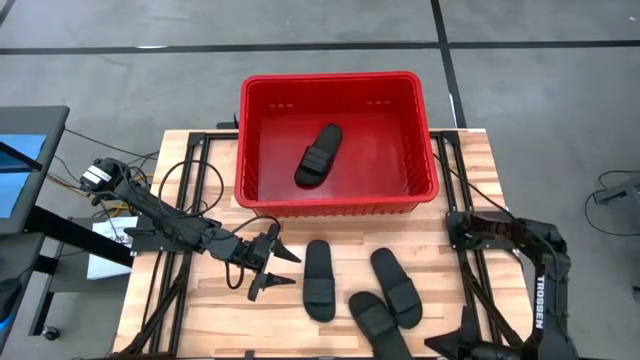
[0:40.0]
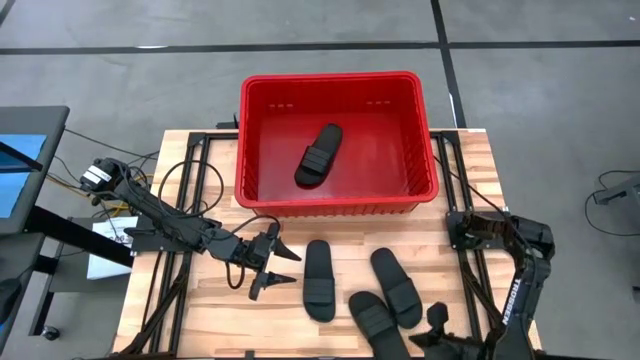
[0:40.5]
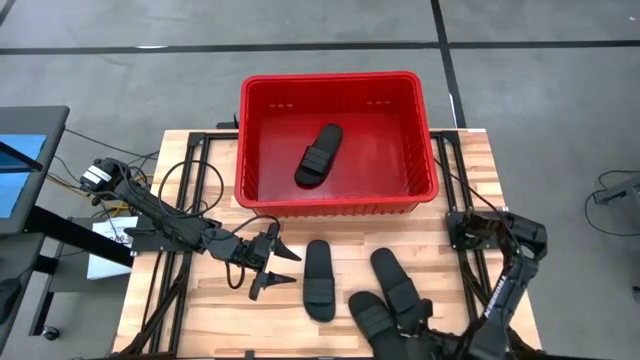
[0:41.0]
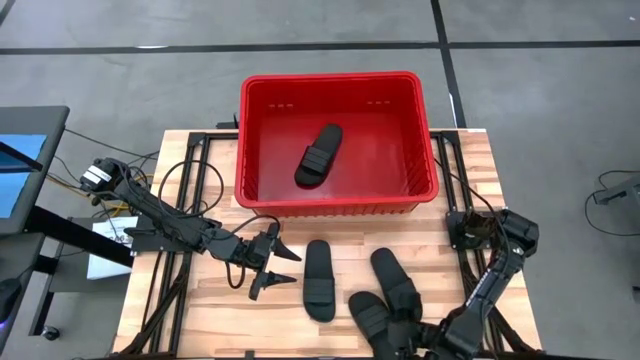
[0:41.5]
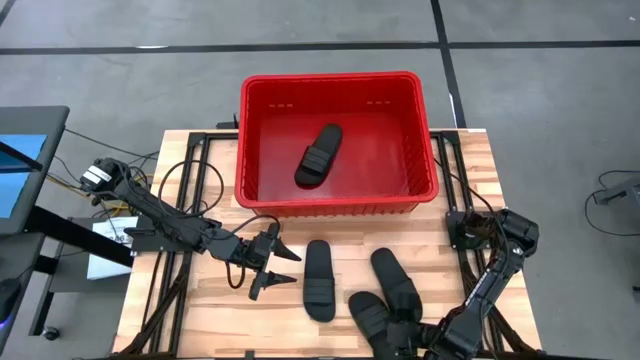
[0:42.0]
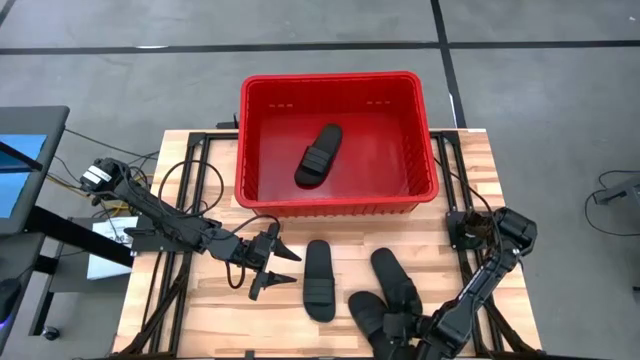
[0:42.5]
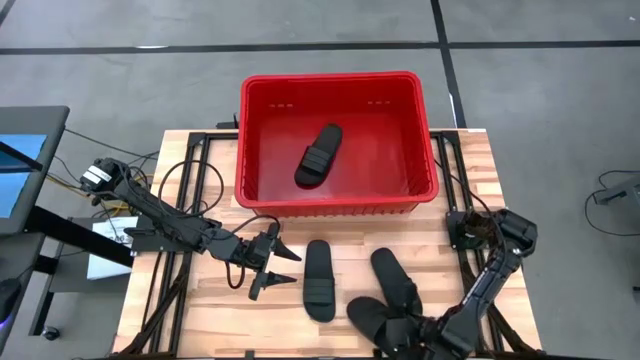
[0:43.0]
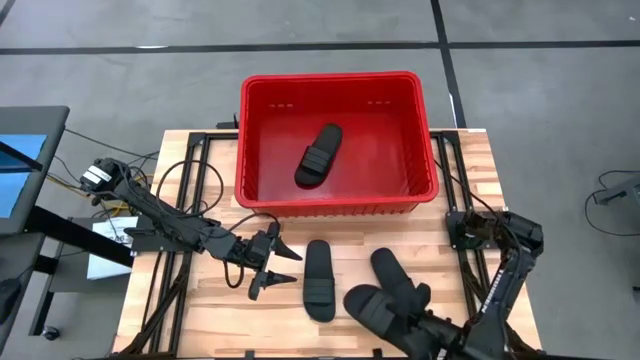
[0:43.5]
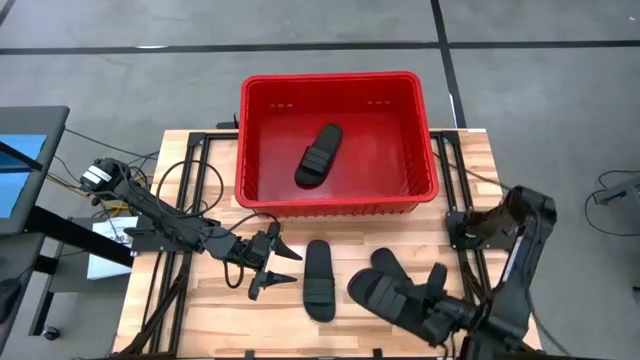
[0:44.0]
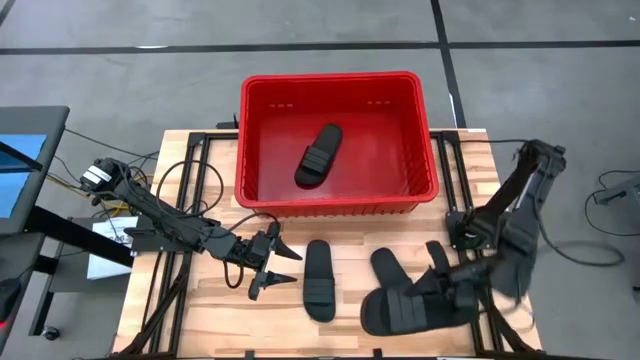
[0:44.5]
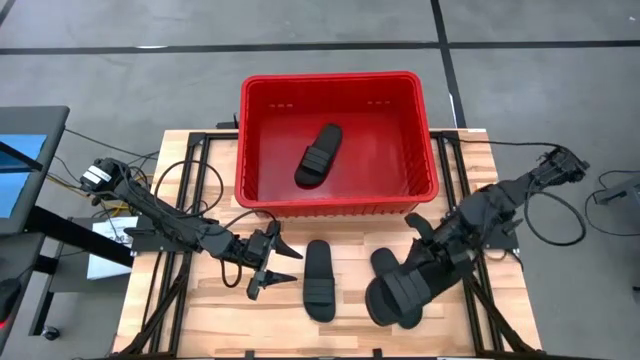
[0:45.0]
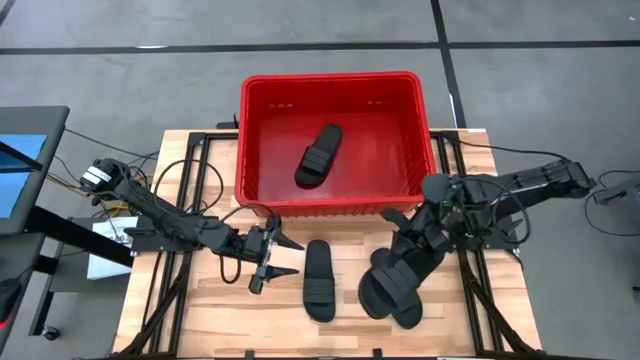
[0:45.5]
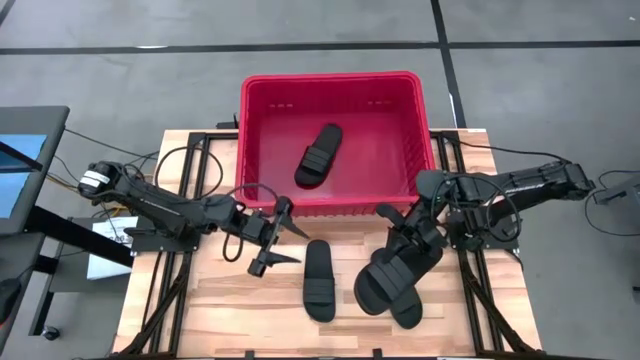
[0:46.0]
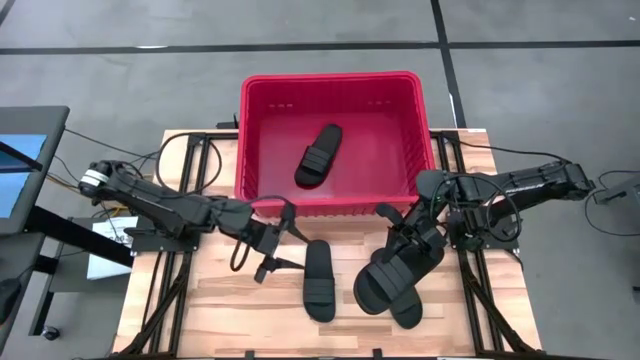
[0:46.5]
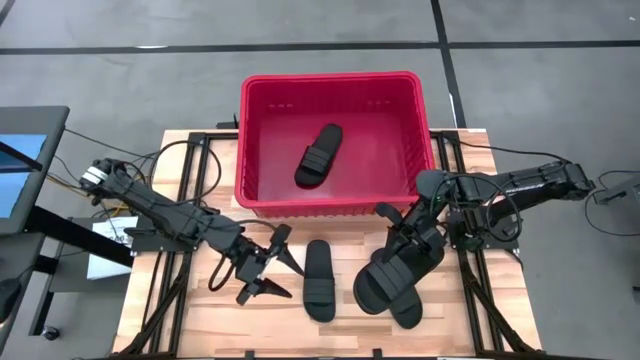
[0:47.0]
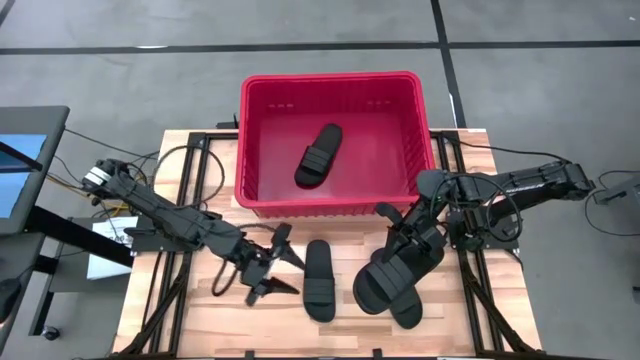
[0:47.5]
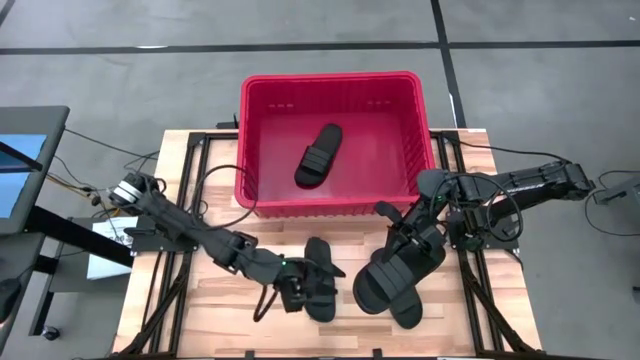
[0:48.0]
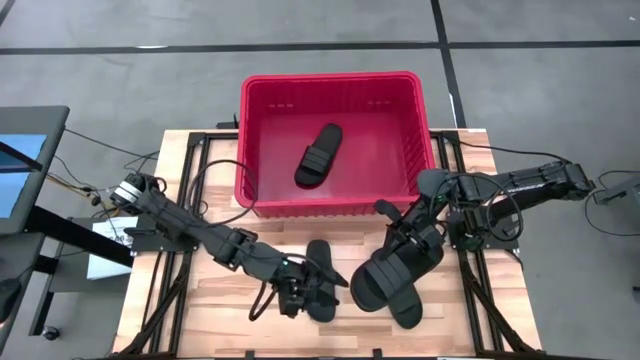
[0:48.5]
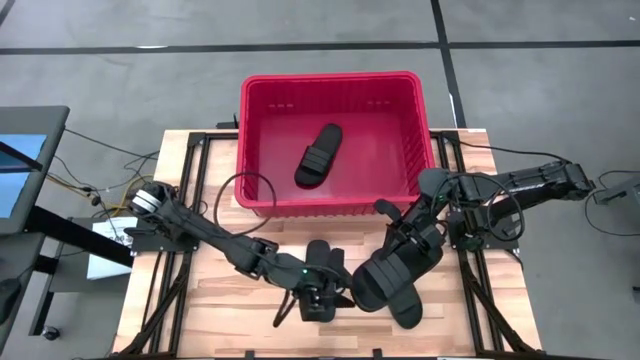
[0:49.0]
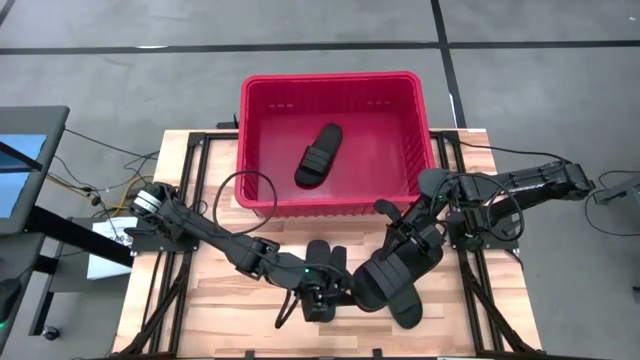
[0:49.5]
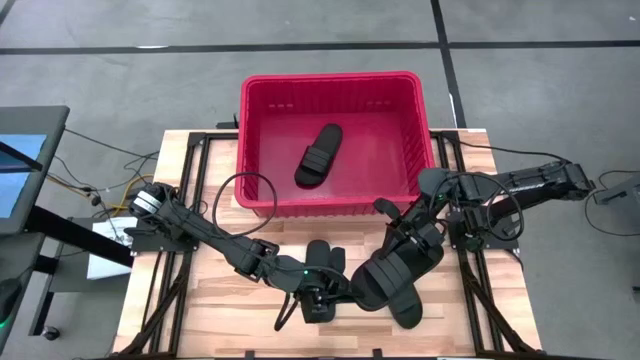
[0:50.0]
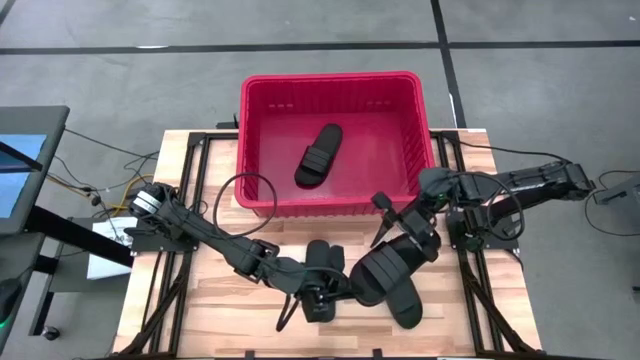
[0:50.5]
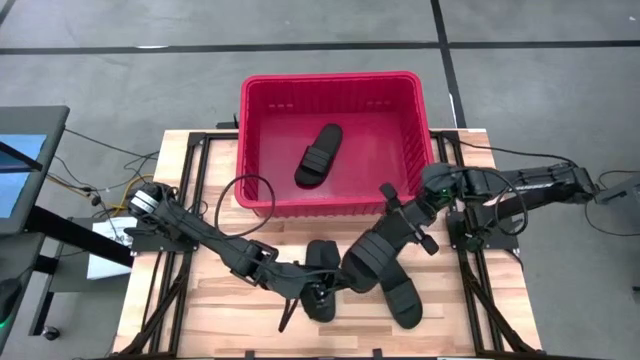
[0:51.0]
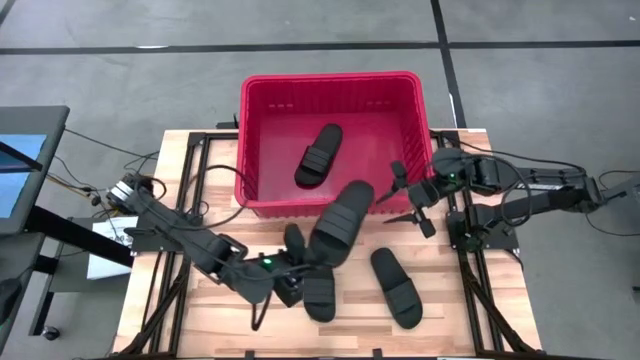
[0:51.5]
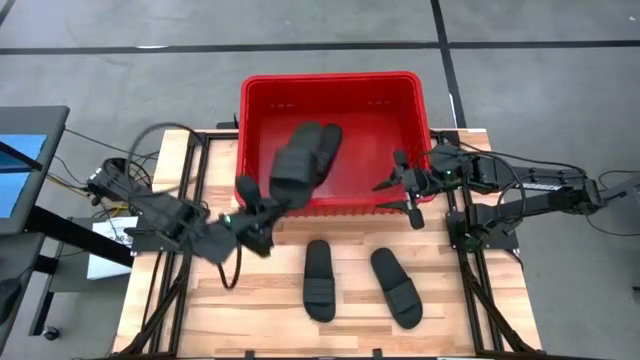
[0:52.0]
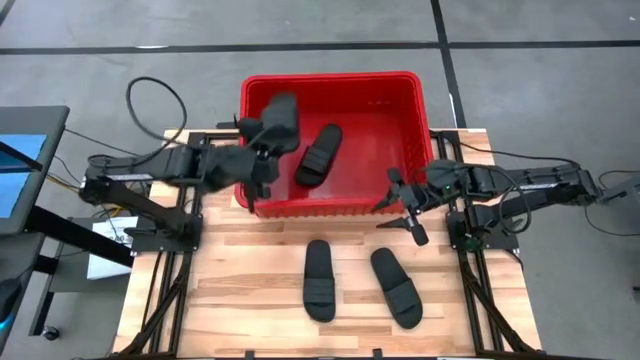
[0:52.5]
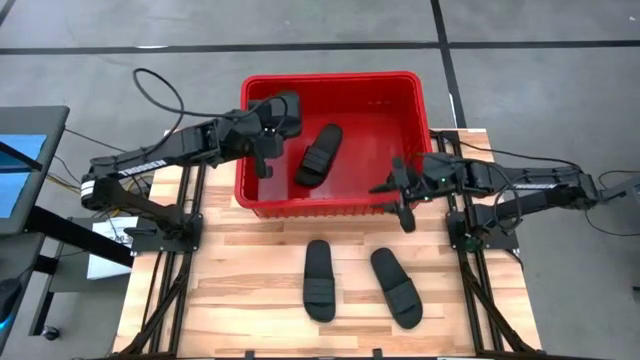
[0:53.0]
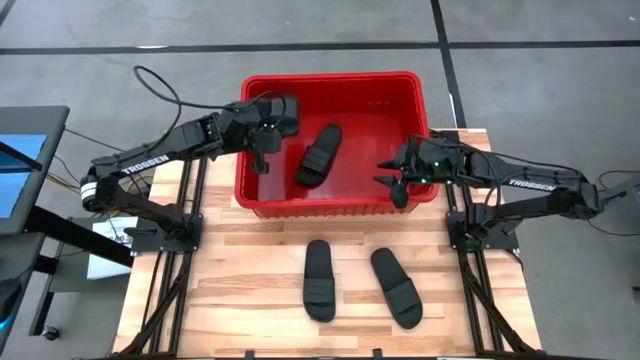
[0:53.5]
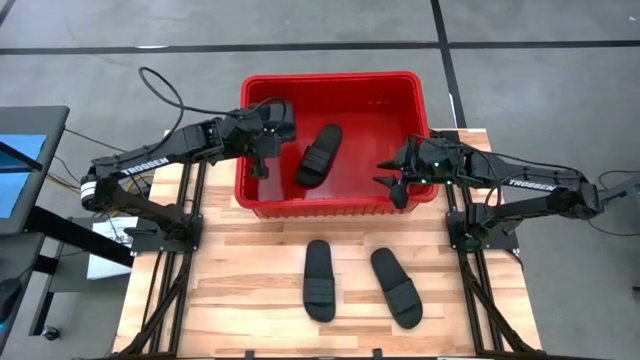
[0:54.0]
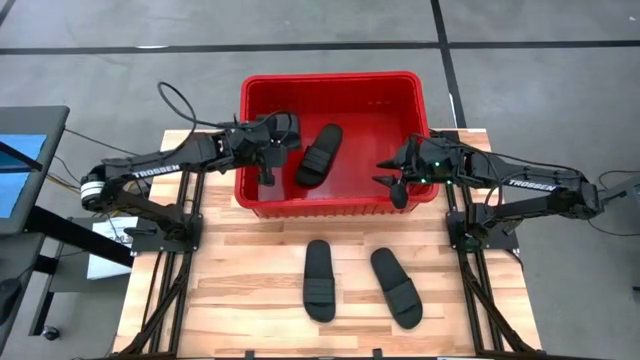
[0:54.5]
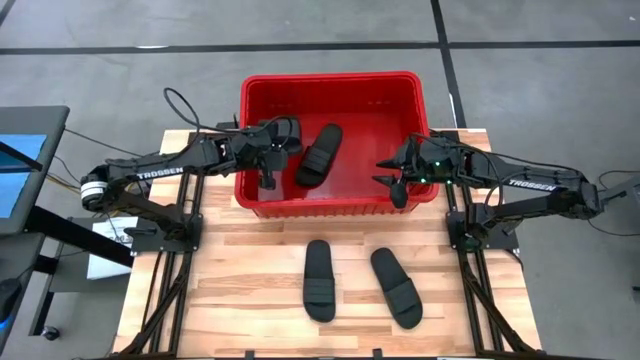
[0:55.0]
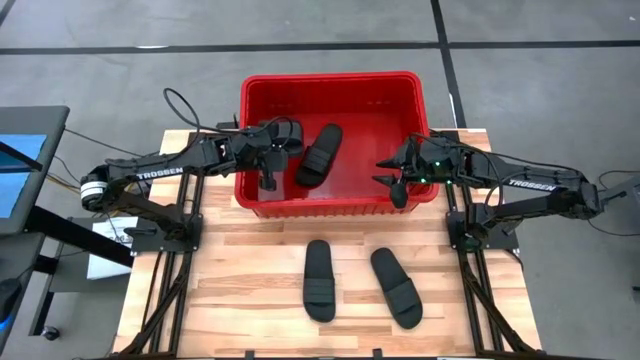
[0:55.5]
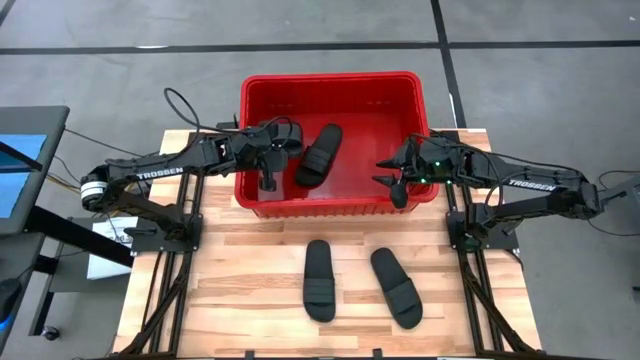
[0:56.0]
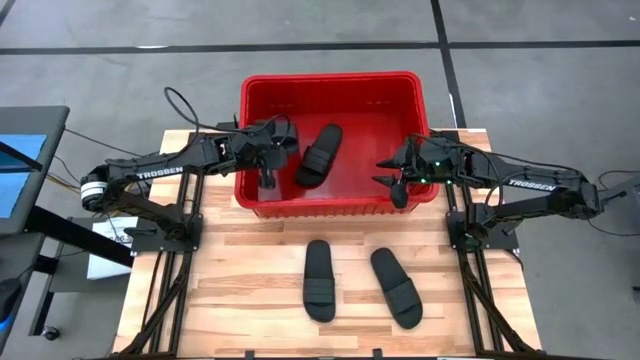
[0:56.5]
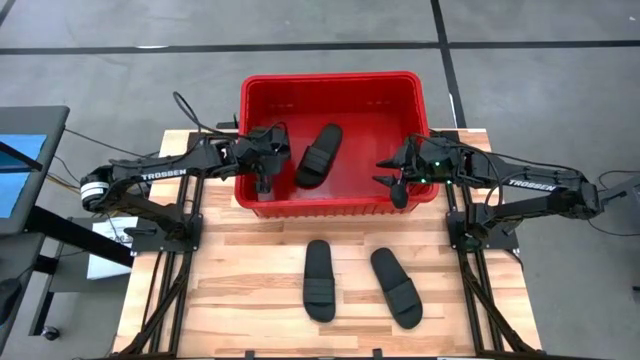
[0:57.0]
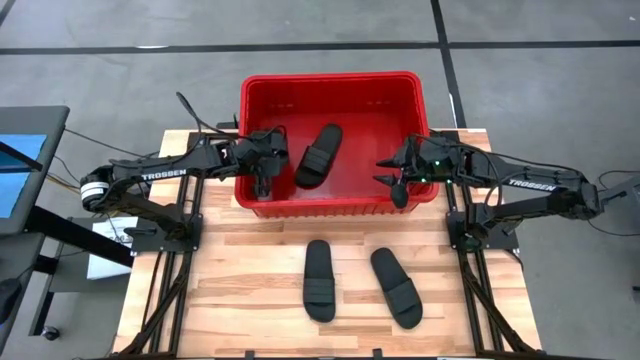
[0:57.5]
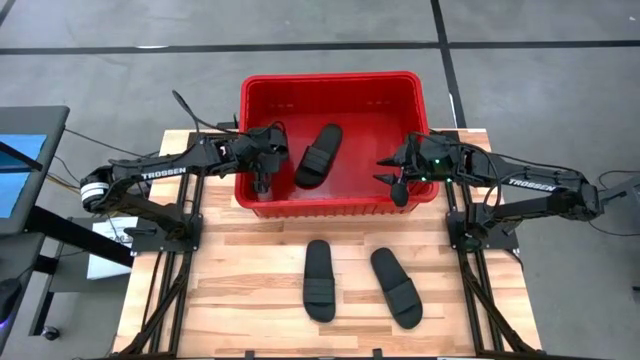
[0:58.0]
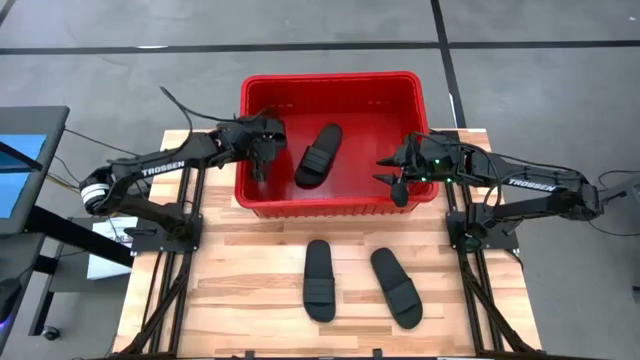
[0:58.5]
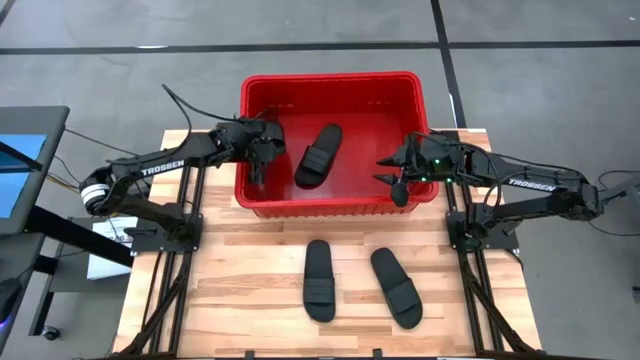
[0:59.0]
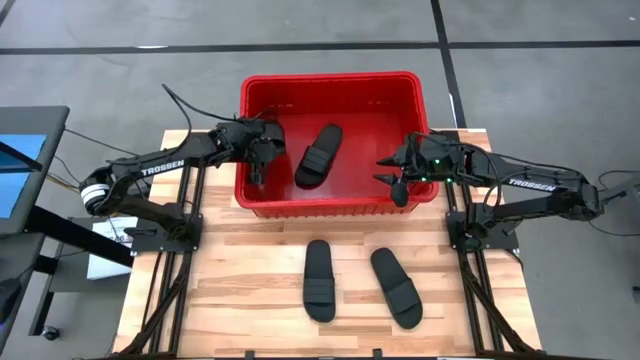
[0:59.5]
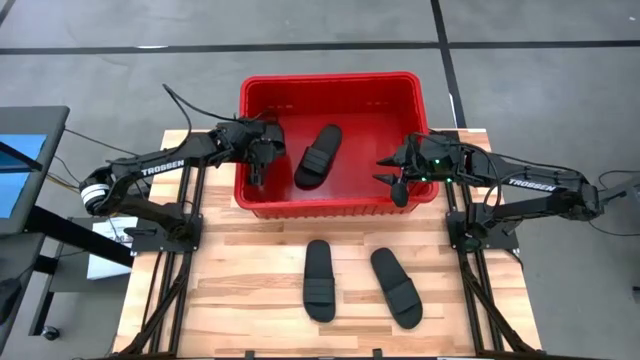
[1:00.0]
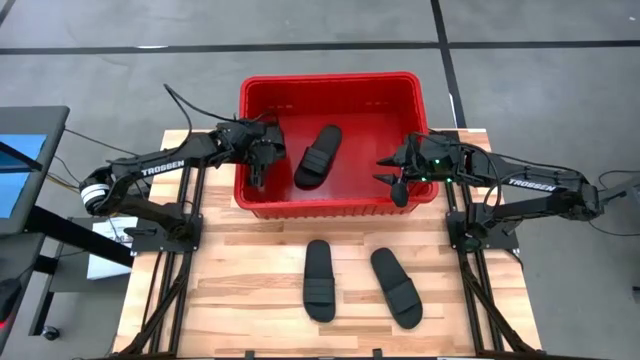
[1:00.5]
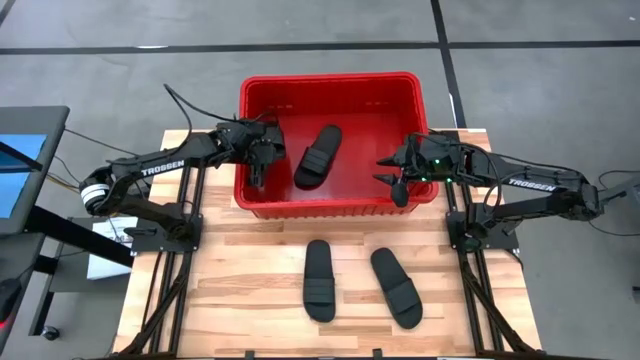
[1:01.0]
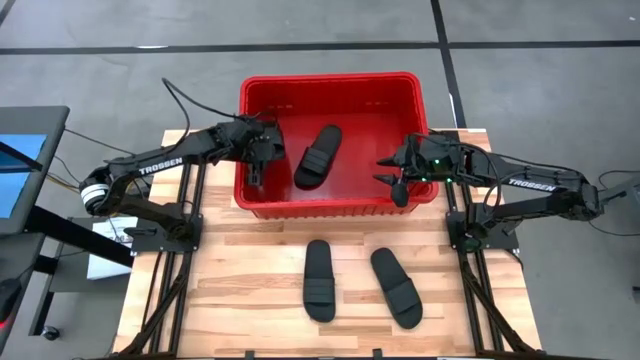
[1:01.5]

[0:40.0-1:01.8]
Task: Pick and place slides into bin
Put the black slipper into the red bin
